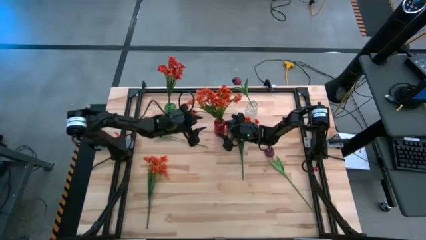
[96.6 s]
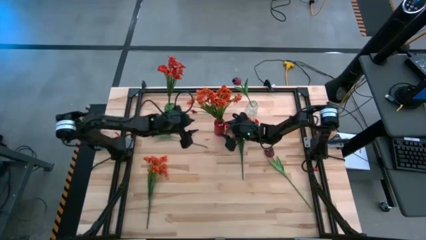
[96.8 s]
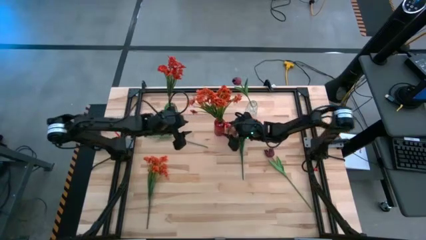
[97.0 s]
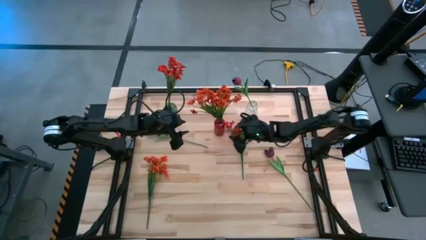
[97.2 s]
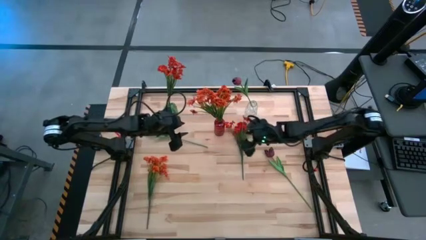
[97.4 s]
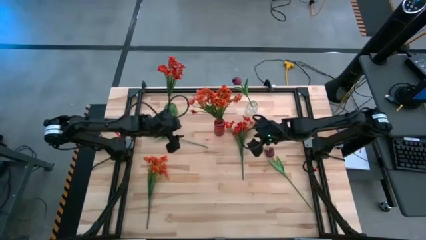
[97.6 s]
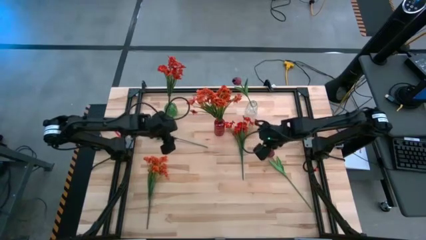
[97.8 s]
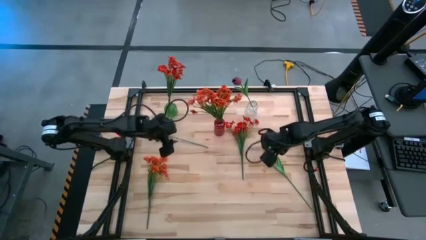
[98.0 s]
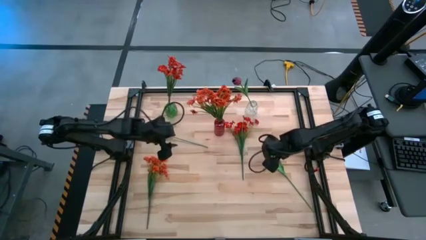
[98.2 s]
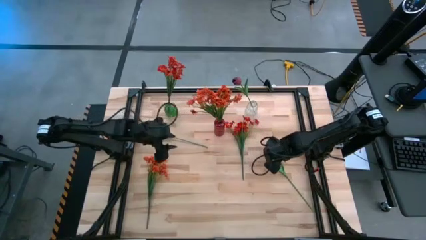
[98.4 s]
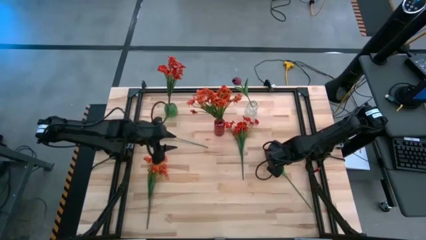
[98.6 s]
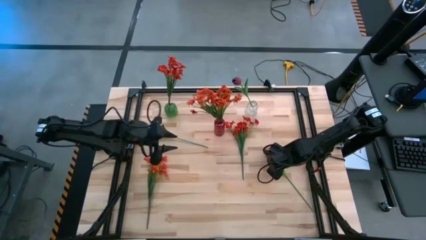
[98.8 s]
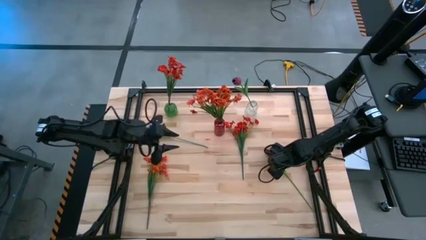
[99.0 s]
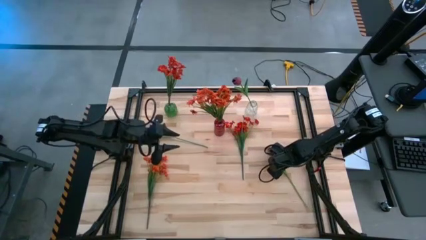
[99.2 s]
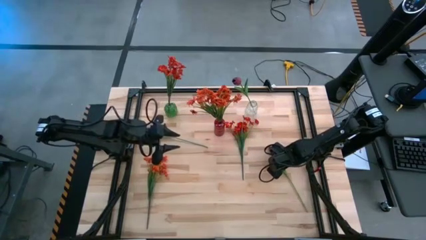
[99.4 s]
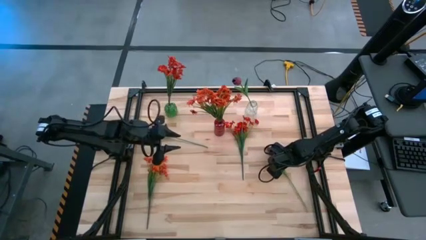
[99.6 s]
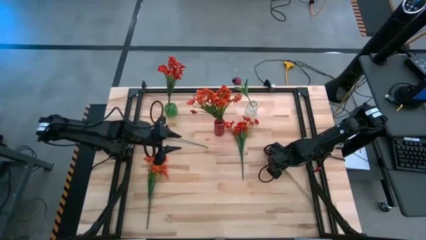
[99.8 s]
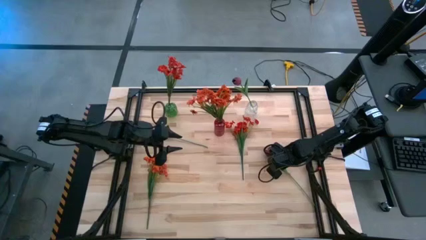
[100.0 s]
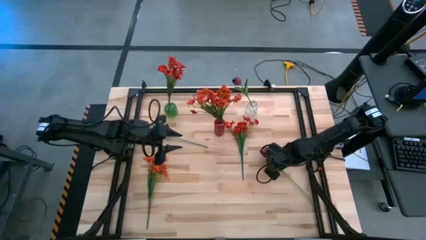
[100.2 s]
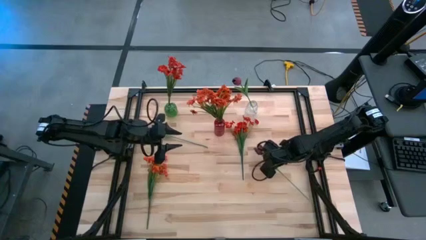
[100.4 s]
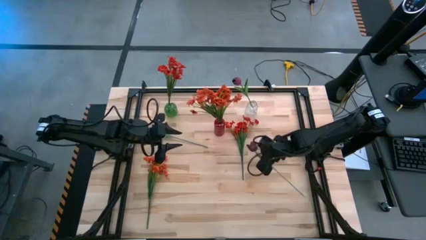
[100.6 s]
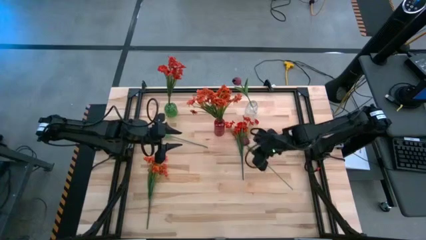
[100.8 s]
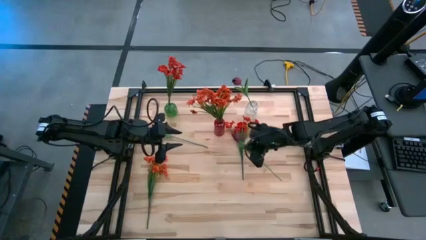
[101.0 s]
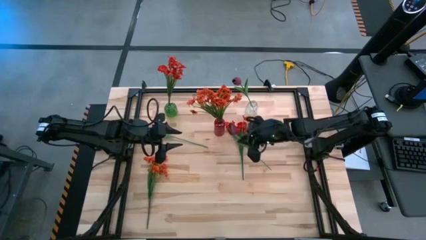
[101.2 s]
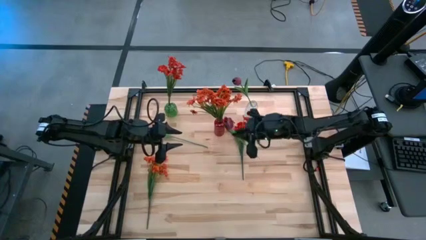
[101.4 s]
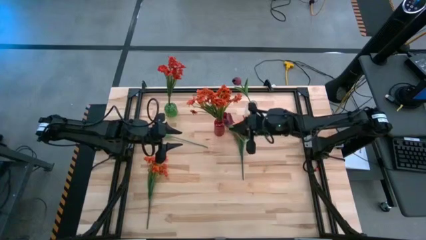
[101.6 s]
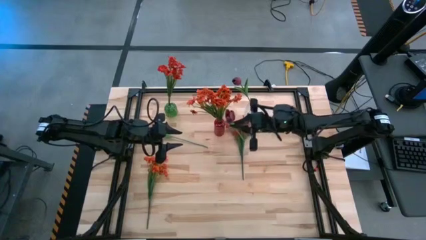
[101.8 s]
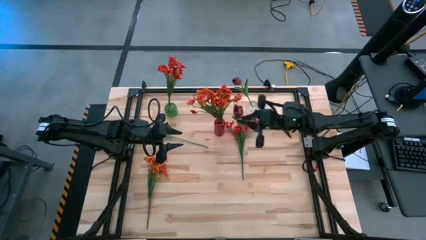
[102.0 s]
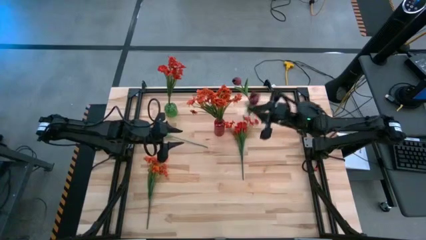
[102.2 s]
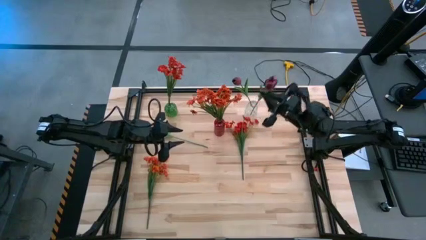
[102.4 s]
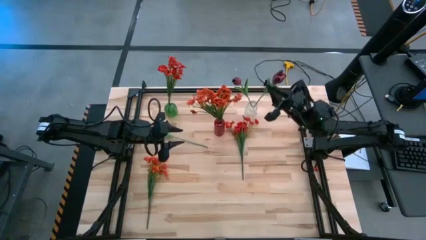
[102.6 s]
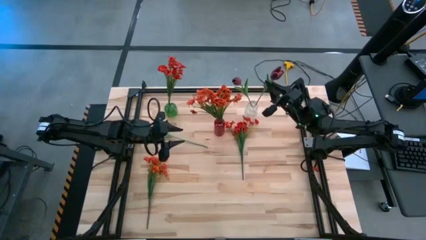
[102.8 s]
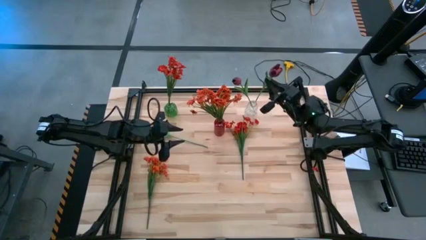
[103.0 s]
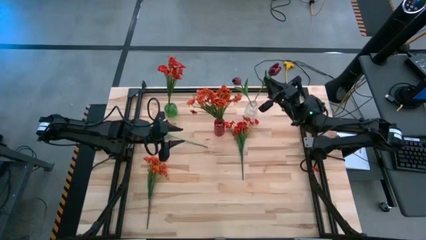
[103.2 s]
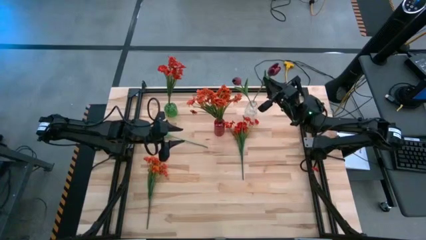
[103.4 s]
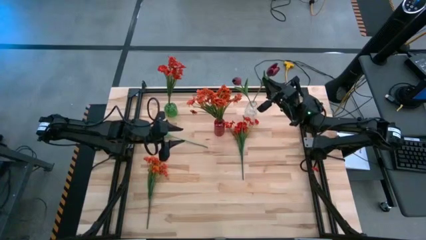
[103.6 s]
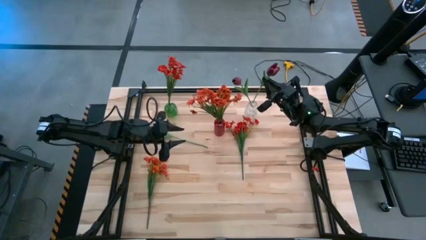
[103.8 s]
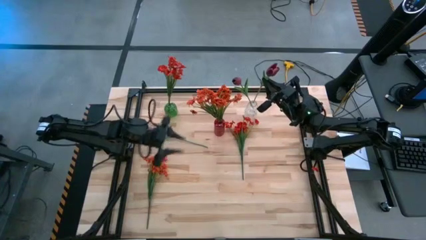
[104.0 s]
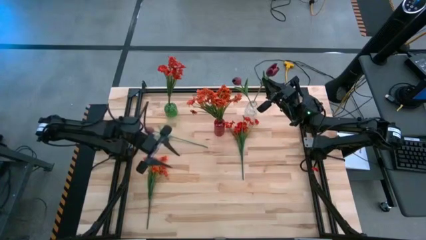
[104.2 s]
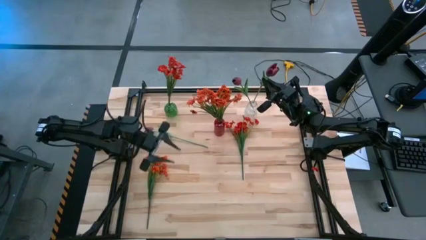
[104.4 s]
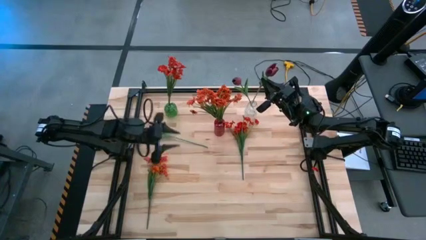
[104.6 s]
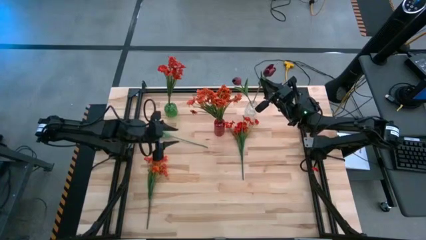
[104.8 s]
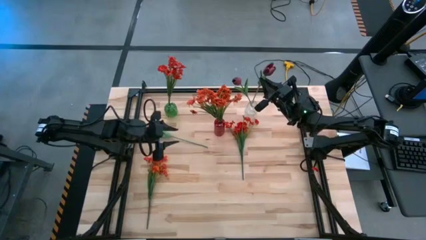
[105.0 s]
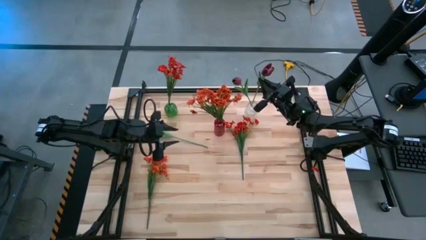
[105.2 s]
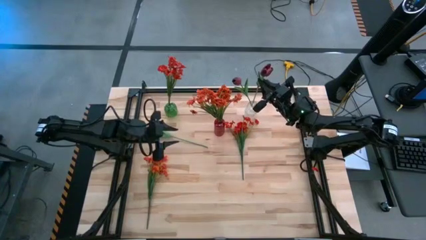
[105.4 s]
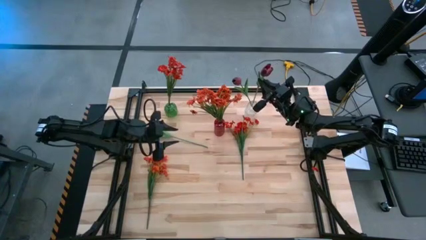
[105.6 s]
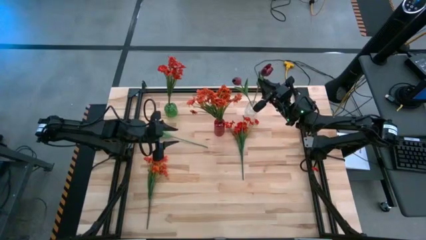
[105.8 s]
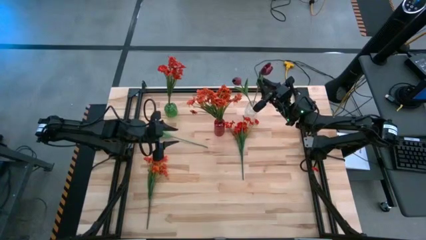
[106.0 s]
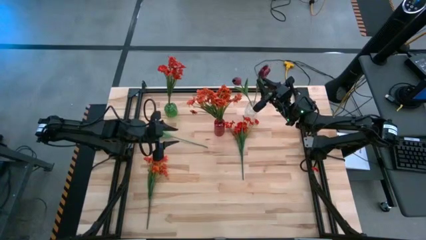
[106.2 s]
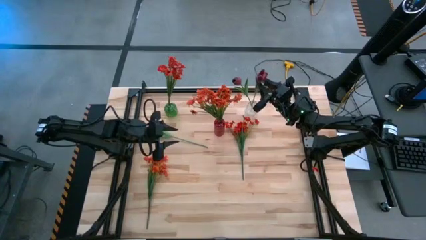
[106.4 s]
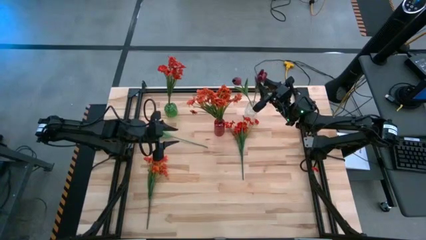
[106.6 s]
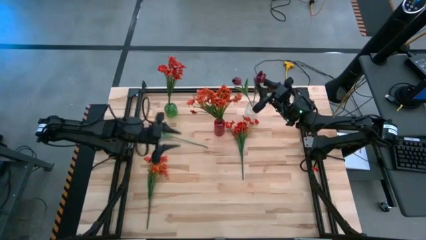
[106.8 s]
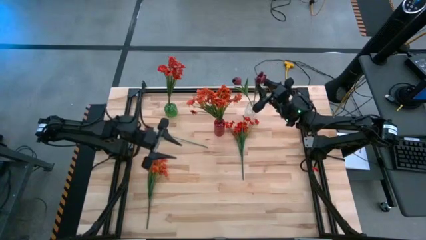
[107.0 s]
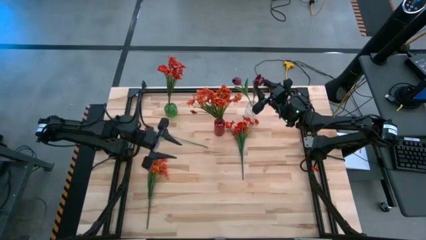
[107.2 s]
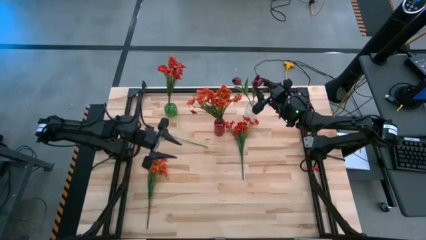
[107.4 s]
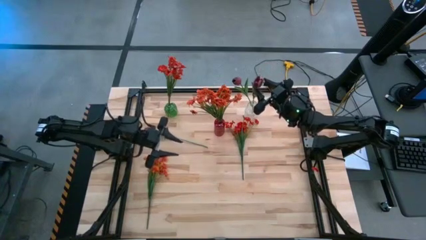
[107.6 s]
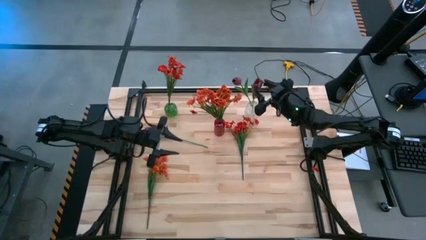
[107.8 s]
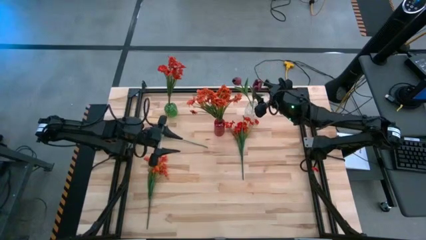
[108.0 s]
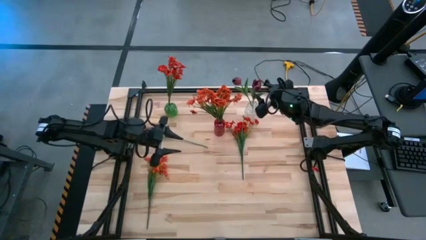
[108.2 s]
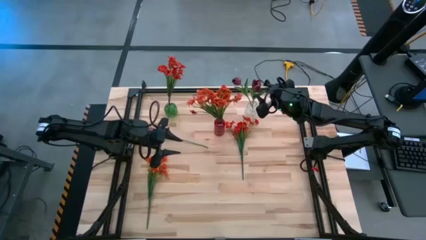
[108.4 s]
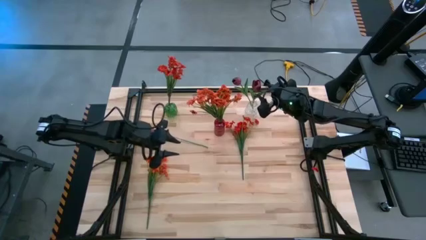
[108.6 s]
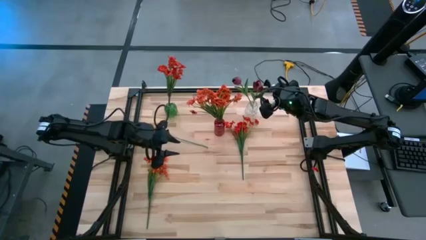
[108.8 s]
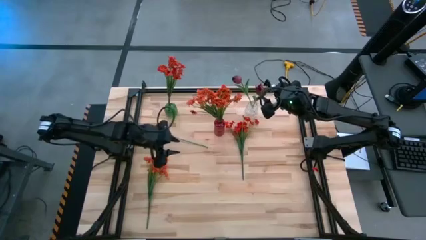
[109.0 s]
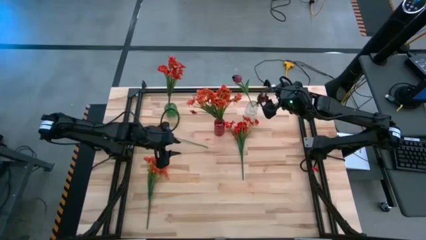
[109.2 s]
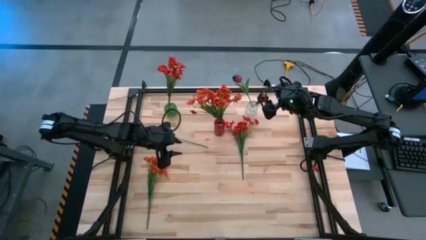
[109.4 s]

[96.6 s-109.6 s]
Task: Sort flowers into vase by color
Put the bottom red flower into the transparent vase

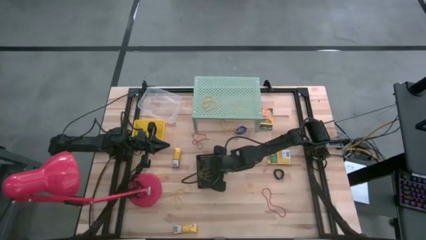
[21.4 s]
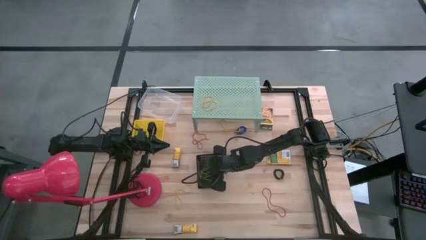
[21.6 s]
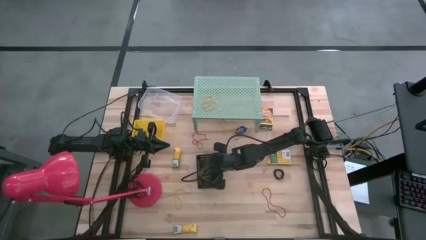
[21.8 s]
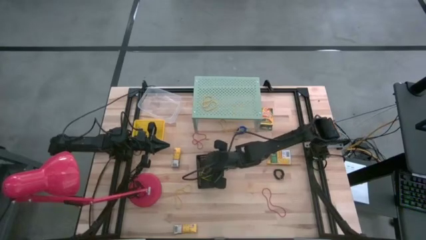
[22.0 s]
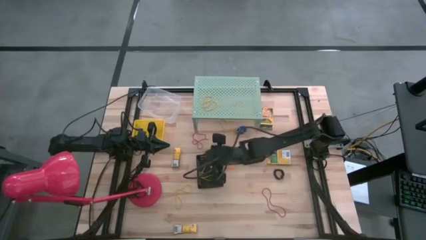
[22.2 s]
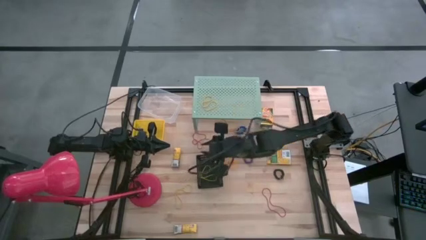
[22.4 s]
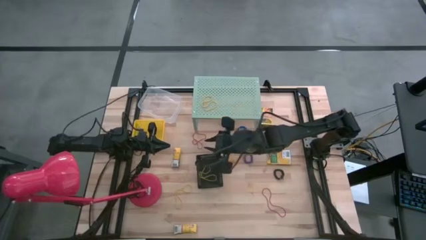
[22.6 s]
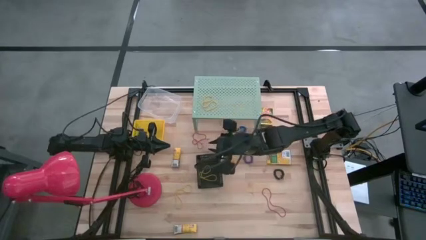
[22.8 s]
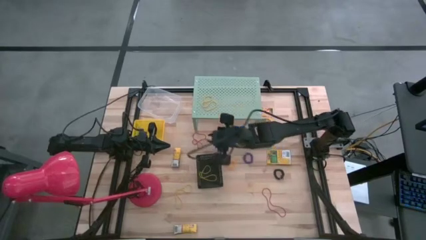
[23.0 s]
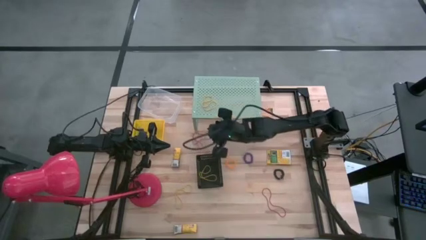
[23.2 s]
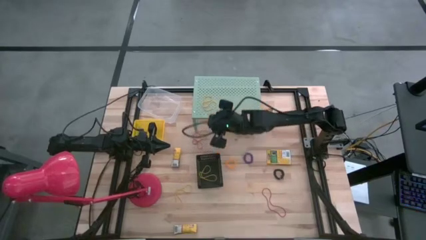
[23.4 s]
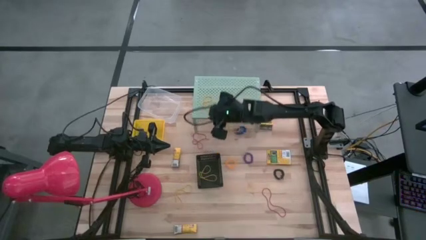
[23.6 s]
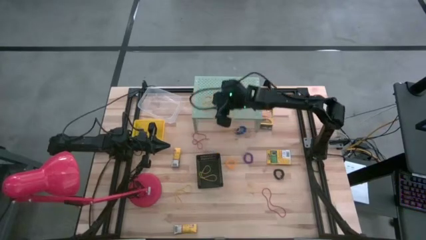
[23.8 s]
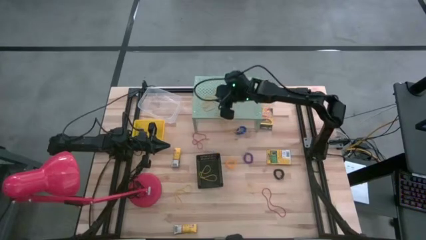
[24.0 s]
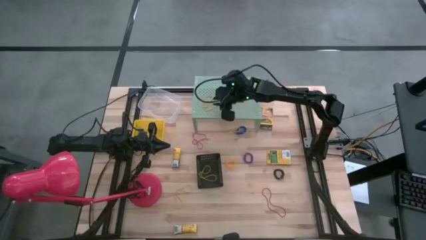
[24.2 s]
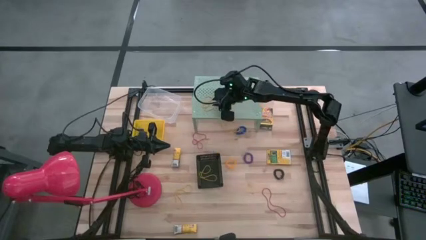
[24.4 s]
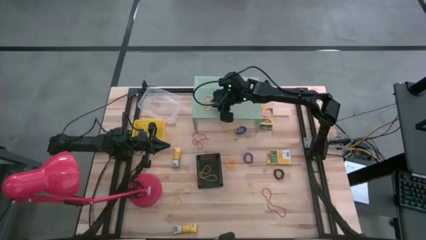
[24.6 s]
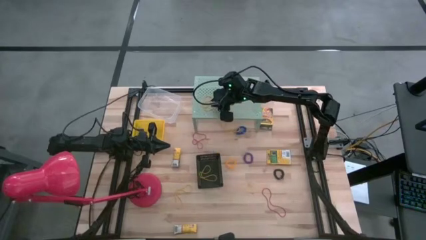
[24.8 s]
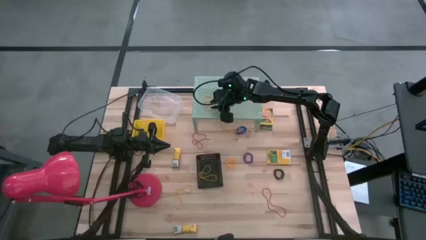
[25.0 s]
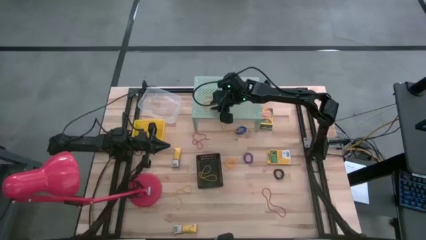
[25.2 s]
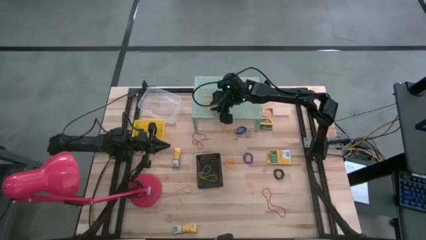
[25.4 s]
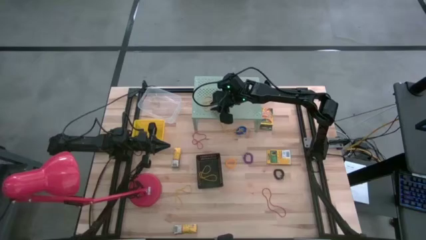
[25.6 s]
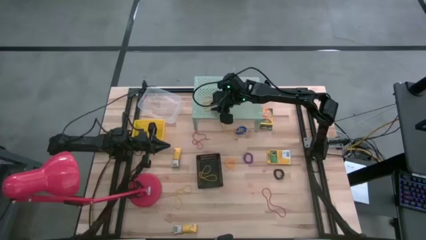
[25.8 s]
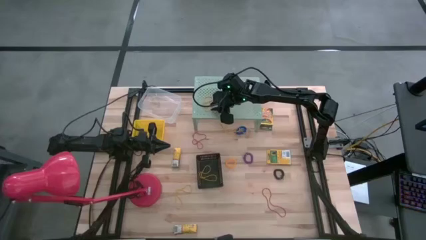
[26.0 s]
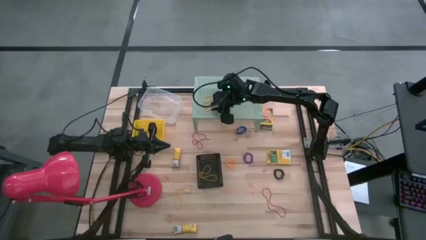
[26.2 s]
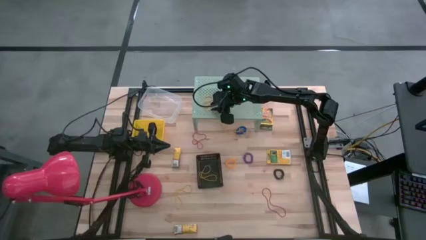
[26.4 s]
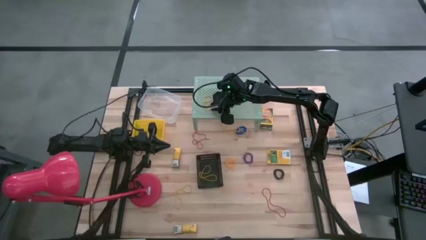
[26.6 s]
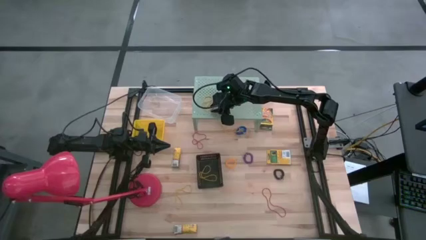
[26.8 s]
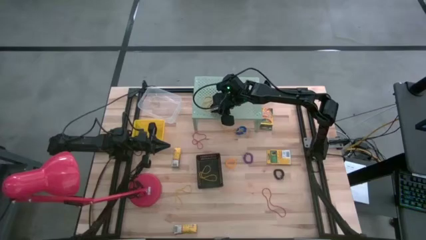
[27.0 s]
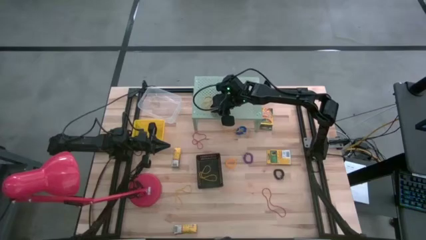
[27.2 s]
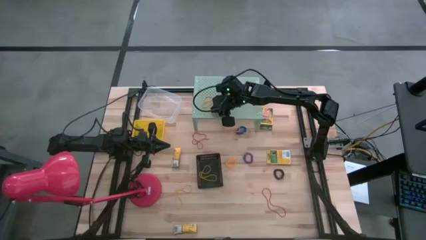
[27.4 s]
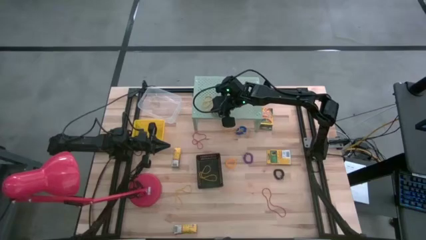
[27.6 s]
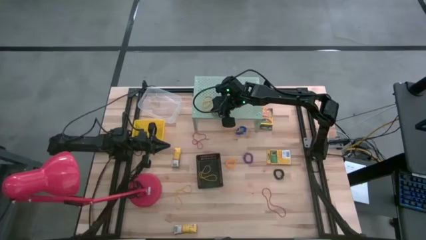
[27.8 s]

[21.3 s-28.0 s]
Task: Pick & Place Office Desk Supplies
Put the yellow rubber band into the black bin
